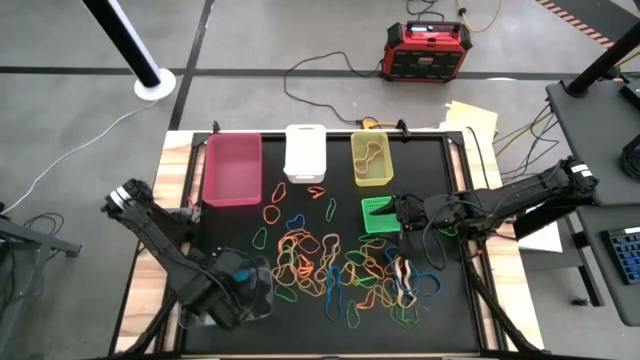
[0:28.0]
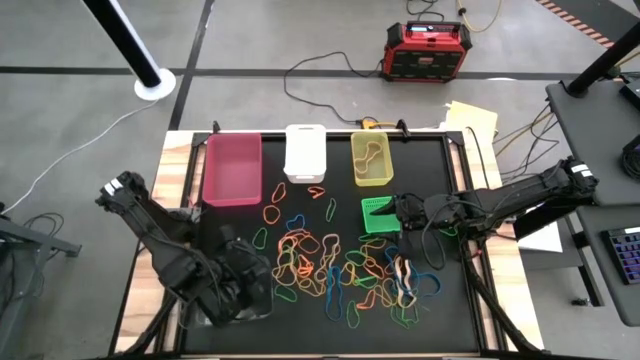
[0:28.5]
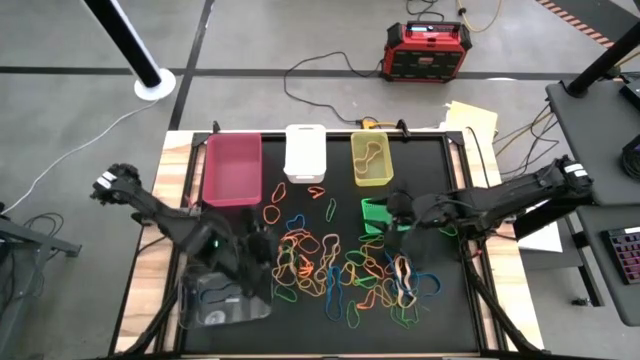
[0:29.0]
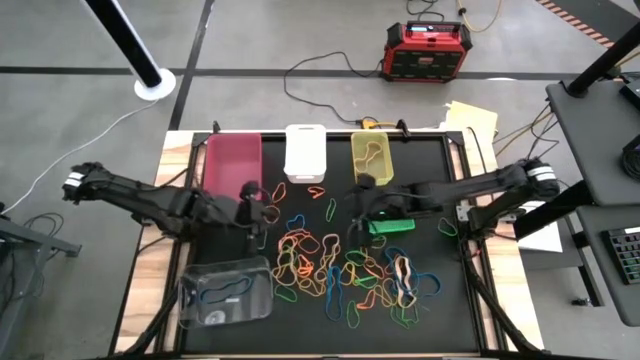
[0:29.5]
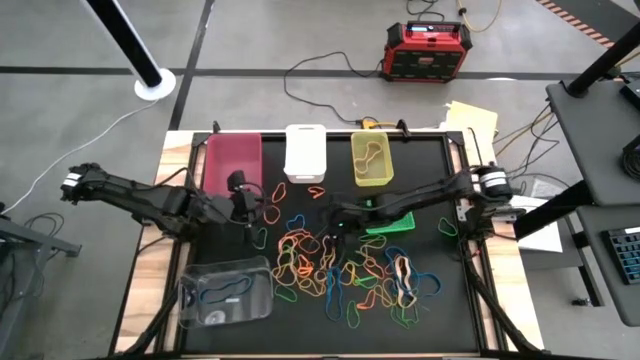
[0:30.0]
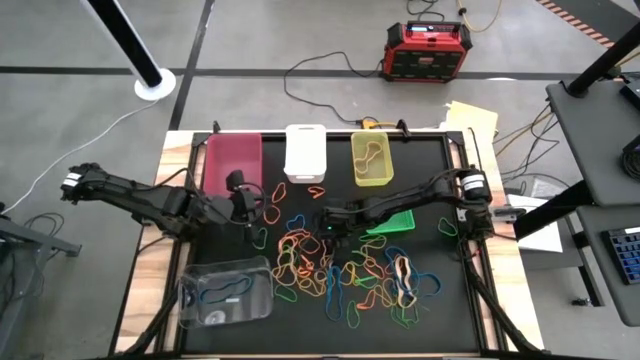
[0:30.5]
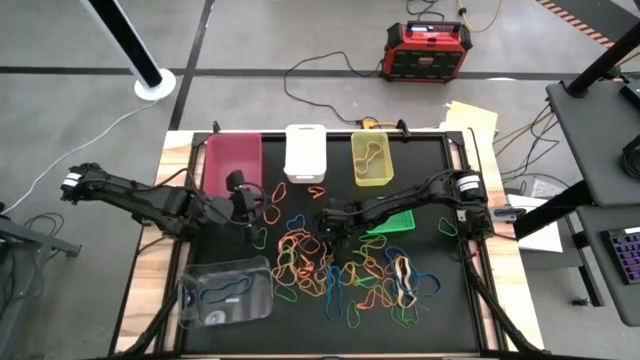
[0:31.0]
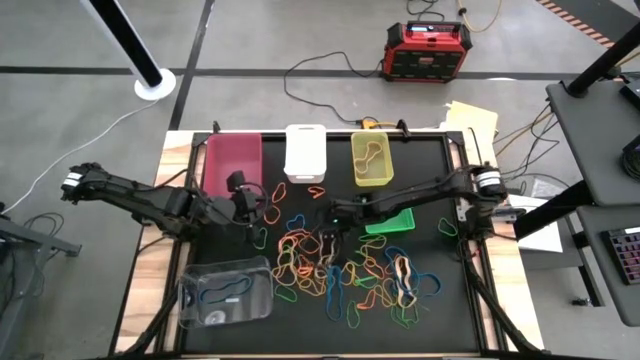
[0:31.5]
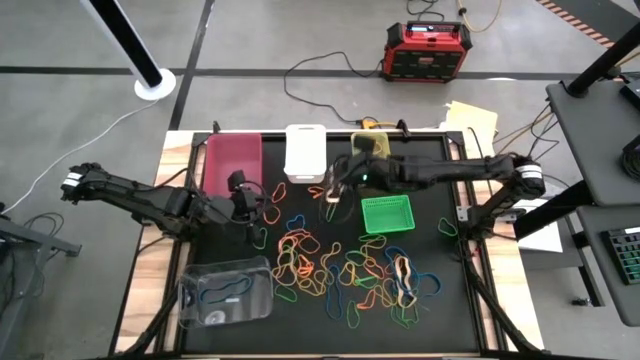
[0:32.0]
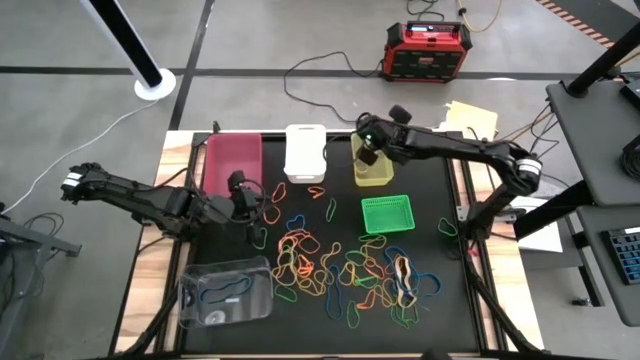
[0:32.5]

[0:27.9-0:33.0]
Task: Sort rubber bands into baskets
Put the brown rubber band into the yellow bin

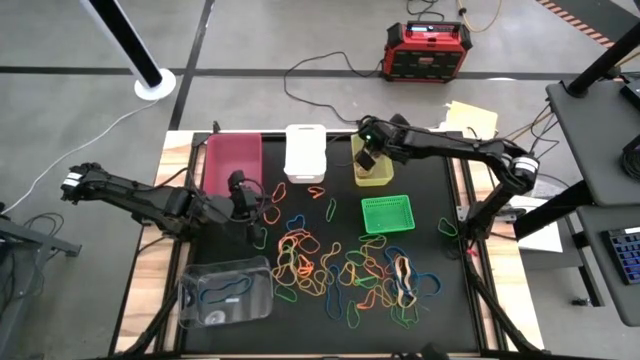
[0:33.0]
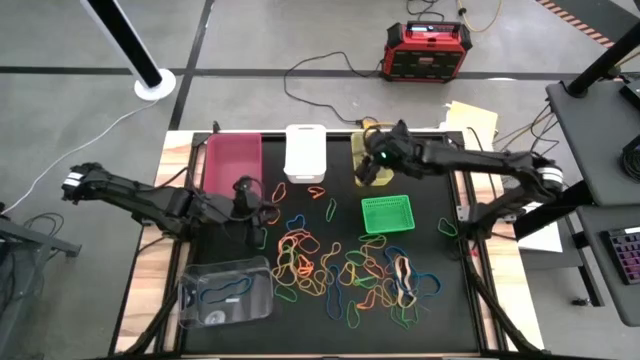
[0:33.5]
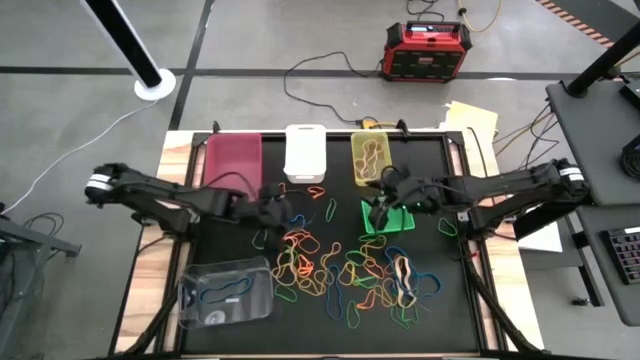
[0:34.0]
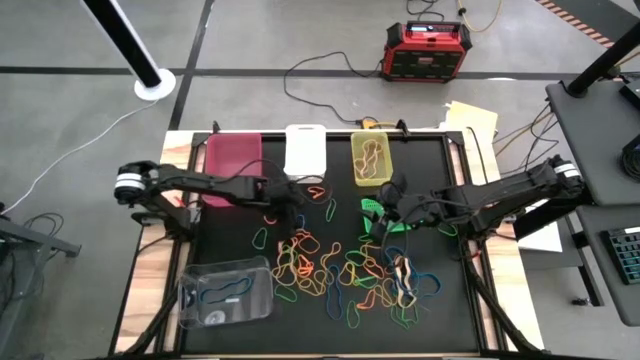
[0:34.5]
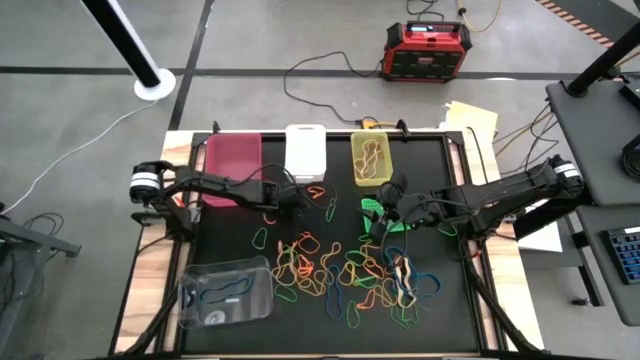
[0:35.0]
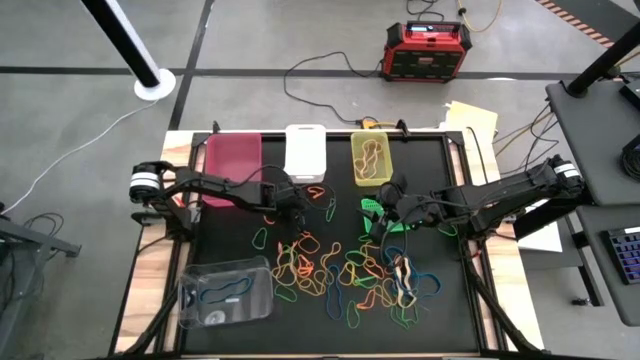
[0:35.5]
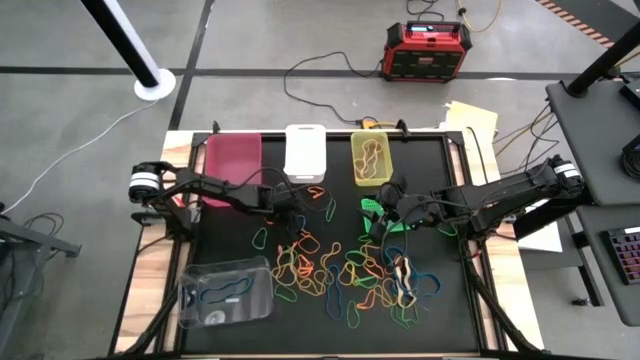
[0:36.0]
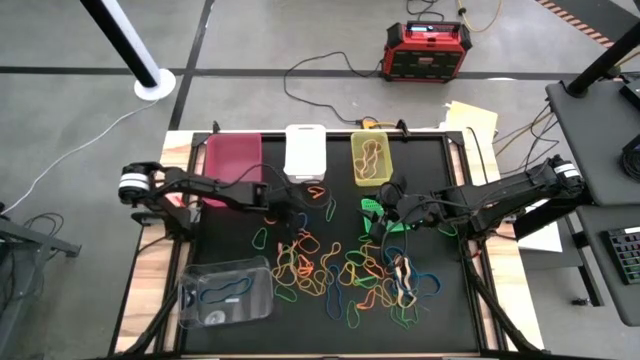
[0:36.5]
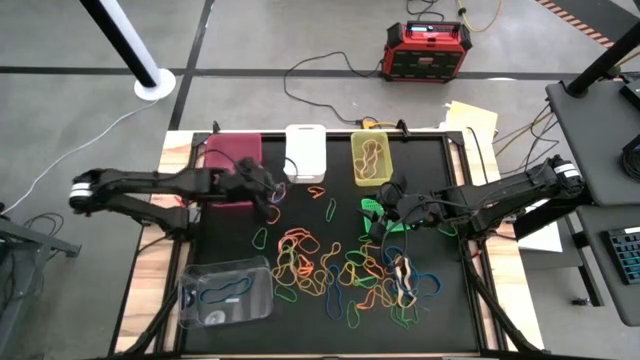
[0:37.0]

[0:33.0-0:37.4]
Put the blue rubber band into the pink bin

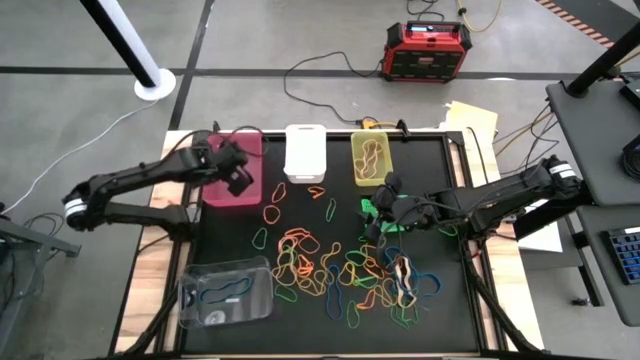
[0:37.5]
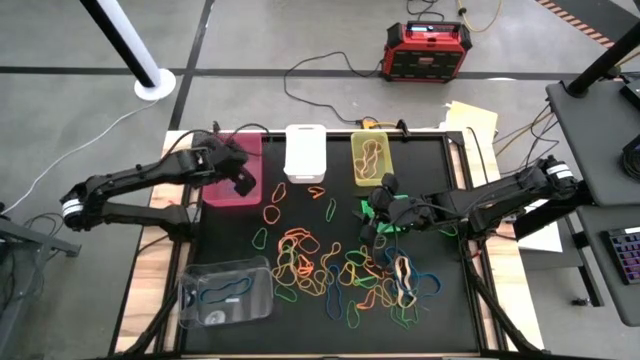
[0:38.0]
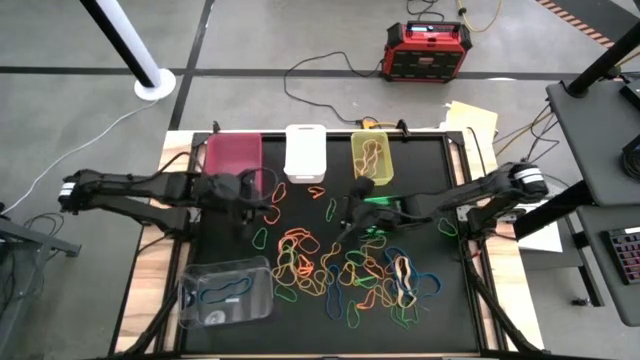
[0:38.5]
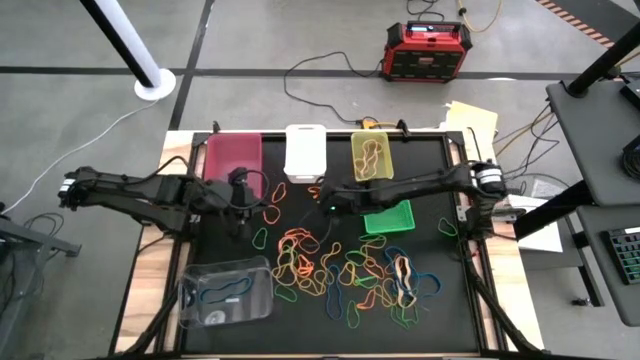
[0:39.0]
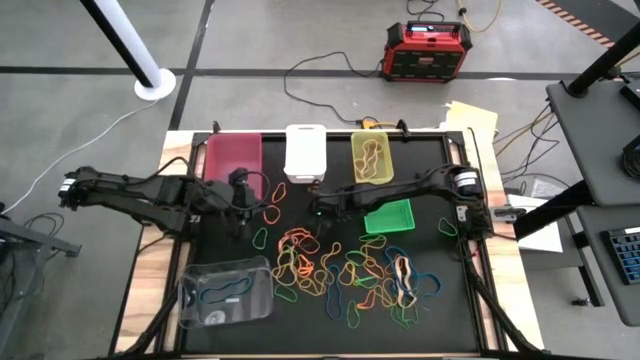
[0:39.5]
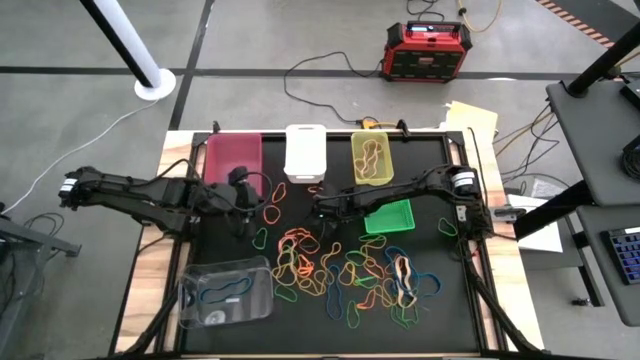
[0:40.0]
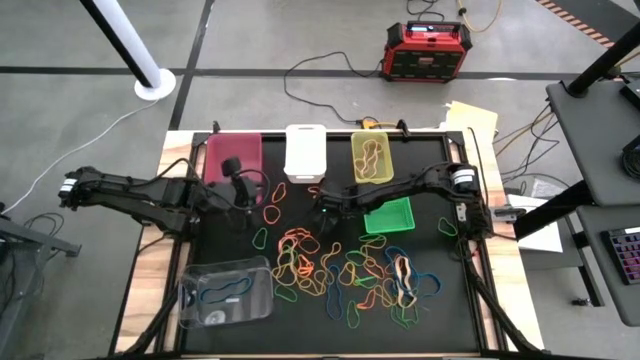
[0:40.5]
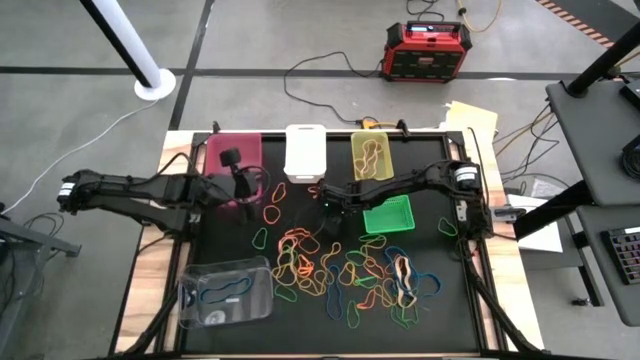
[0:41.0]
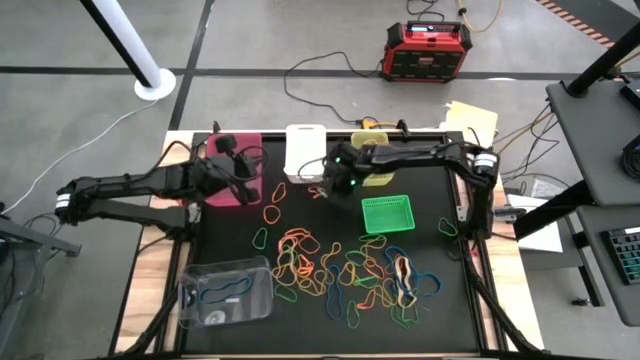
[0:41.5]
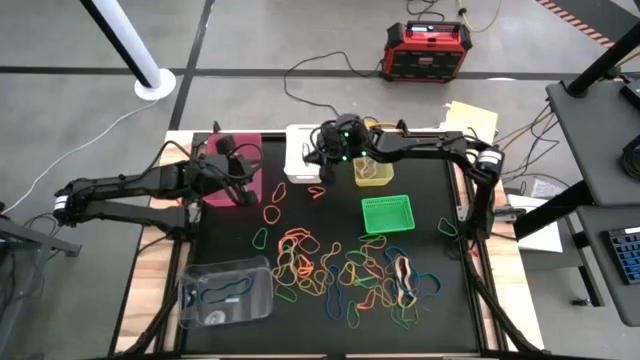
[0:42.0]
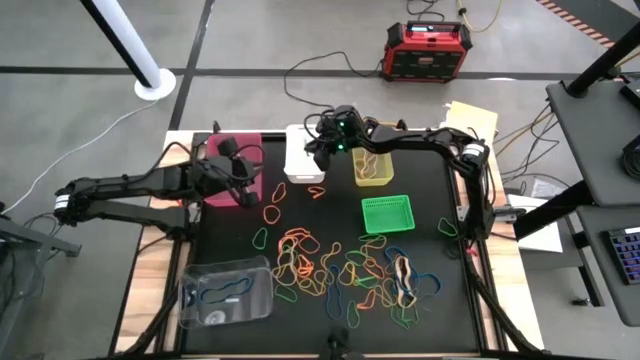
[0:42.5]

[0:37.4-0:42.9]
Put the green rubber band into the white bin

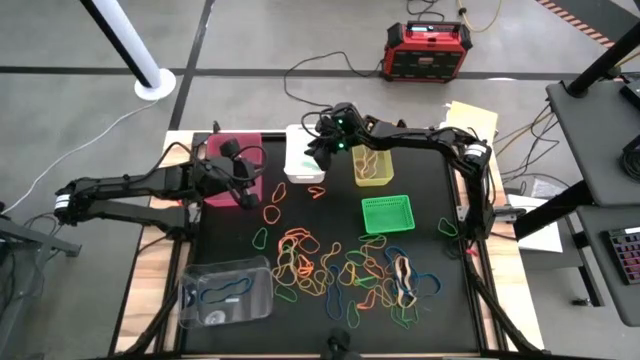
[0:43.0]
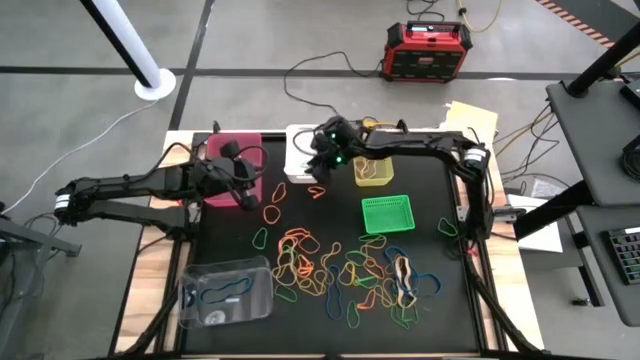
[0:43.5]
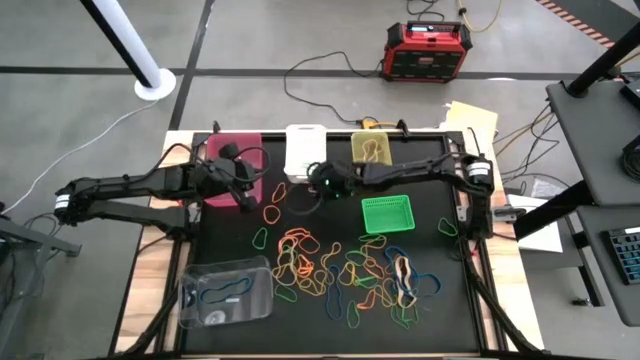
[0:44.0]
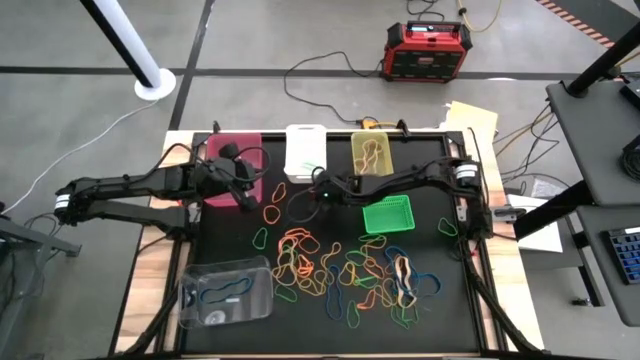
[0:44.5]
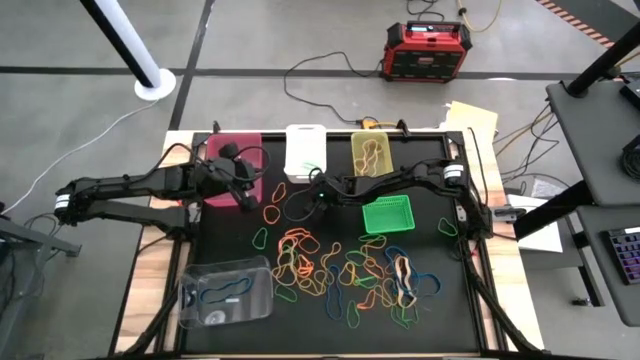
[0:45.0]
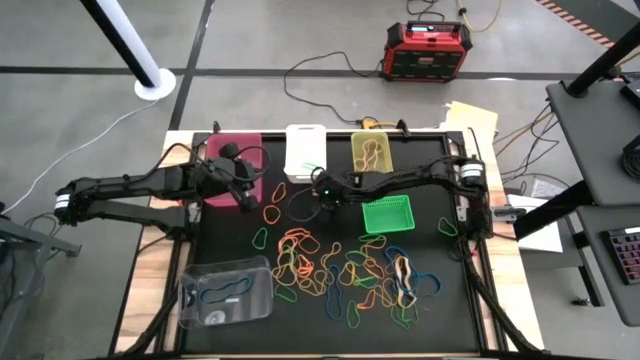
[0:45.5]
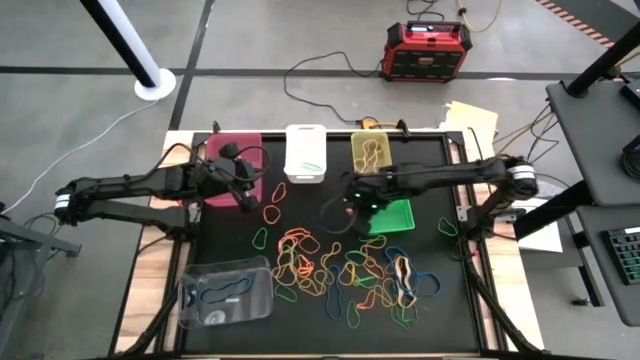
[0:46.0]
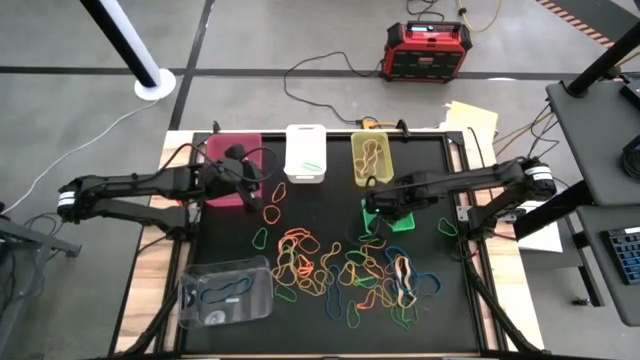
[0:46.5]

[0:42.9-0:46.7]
Put the orange rubber band into the green bin

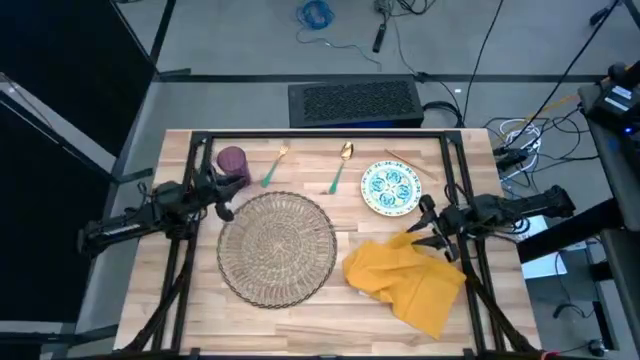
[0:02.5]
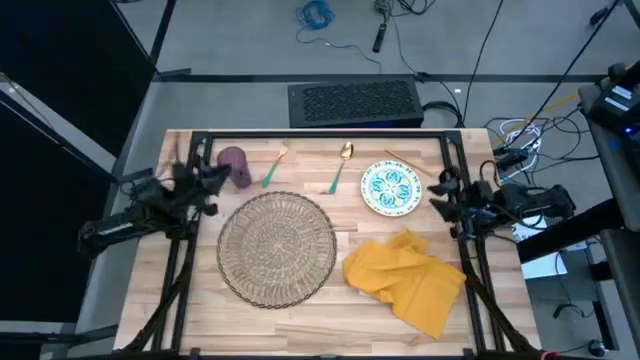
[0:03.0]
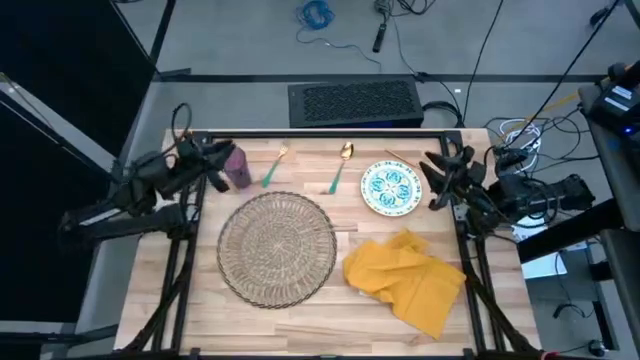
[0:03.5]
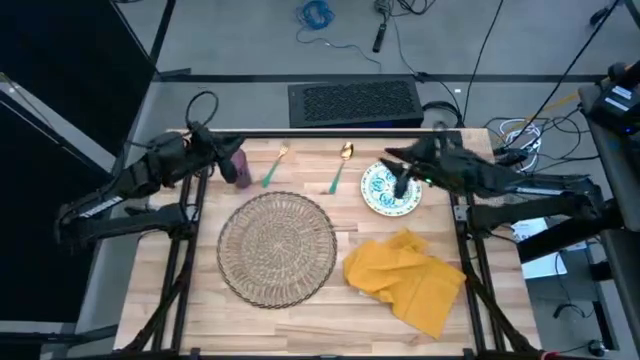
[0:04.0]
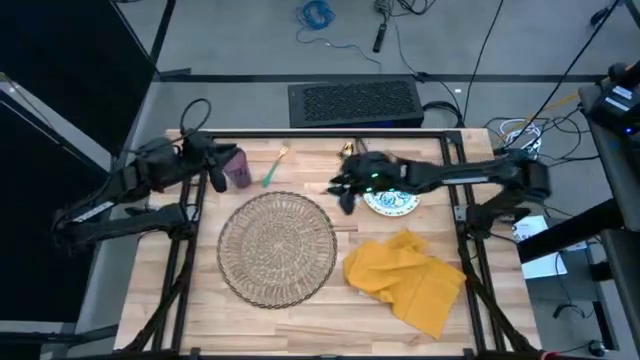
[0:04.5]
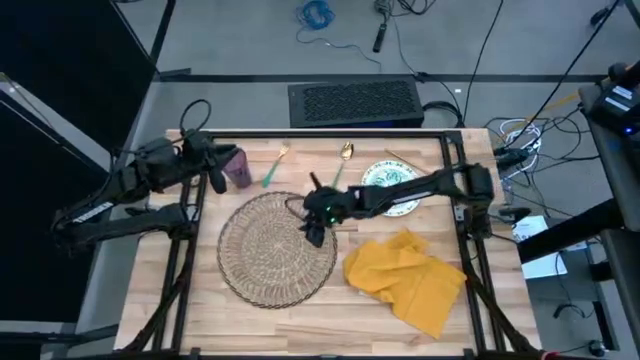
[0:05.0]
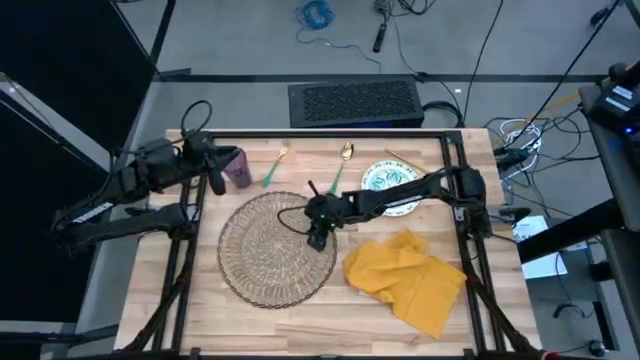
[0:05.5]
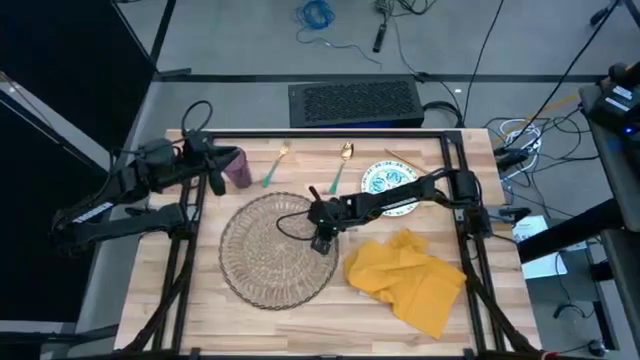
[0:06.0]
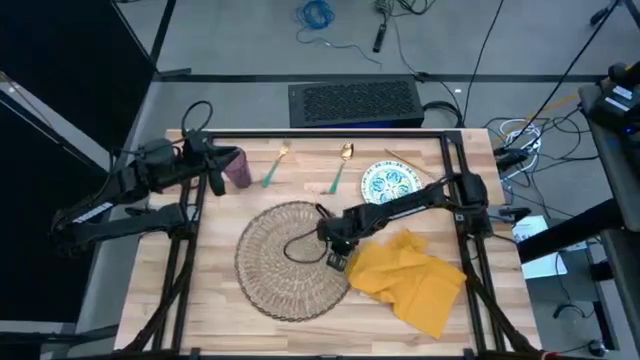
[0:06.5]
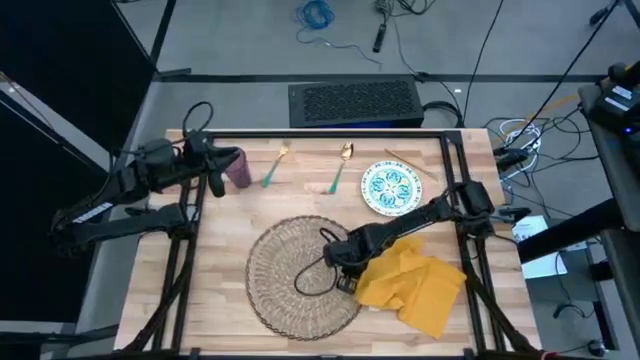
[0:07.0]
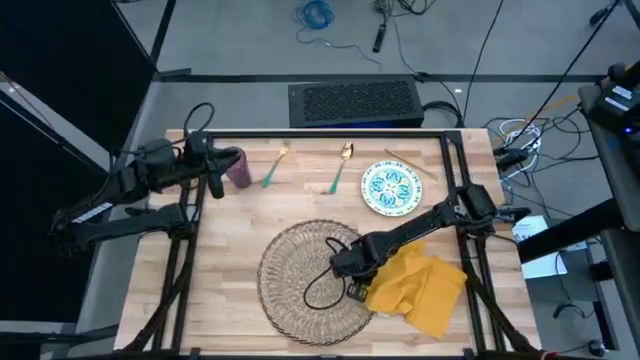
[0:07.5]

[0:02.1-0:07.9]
Task: Set table place
Move the brown placemat
